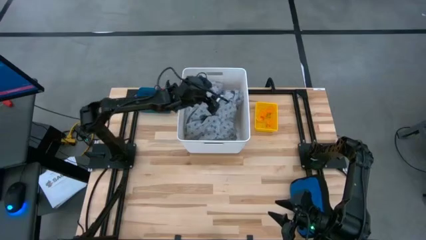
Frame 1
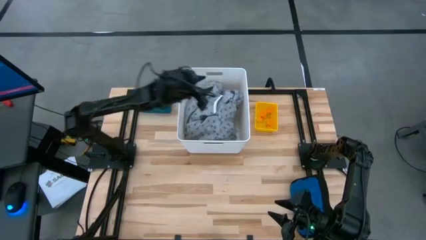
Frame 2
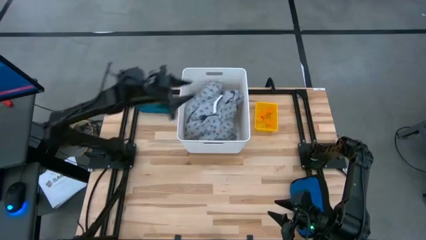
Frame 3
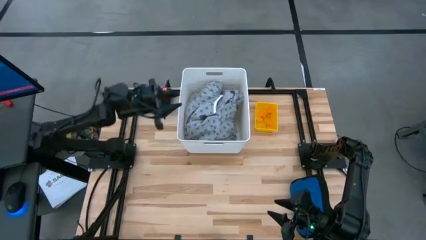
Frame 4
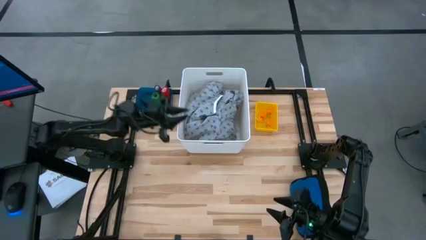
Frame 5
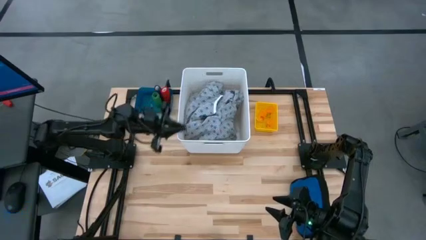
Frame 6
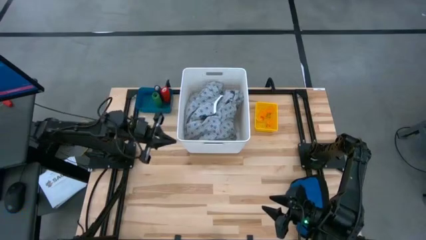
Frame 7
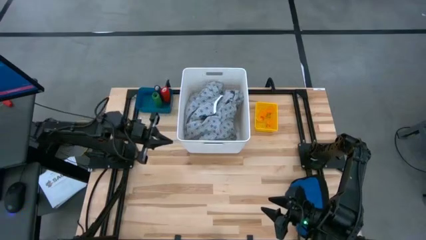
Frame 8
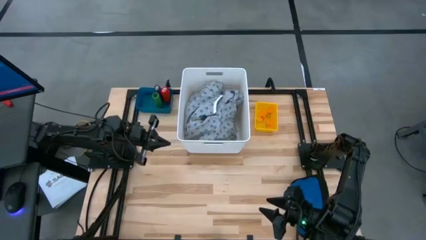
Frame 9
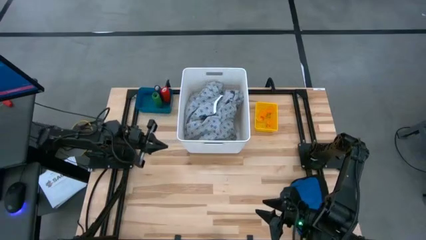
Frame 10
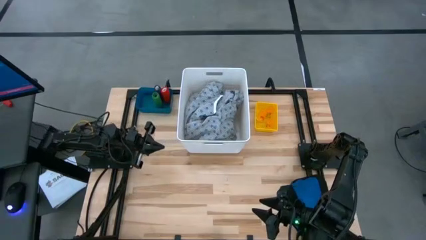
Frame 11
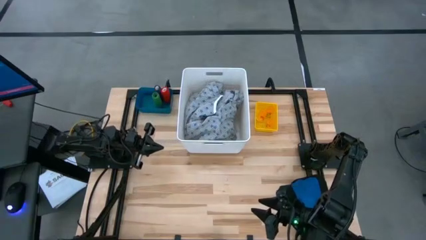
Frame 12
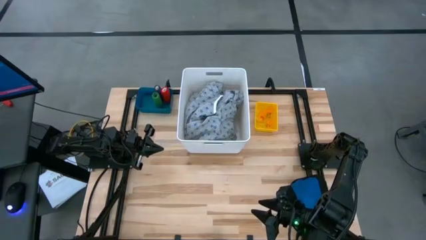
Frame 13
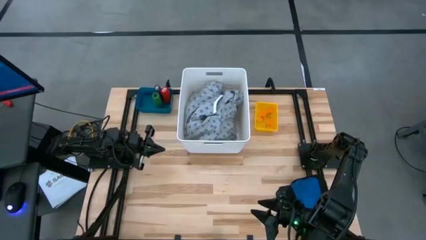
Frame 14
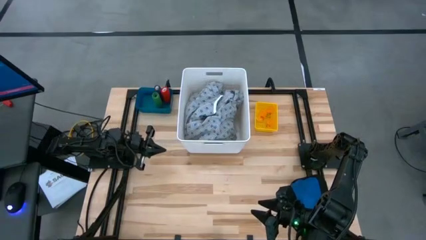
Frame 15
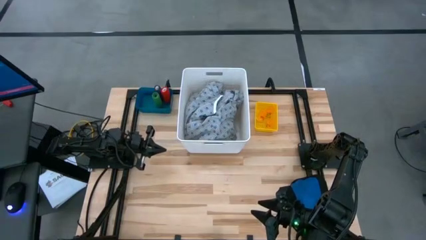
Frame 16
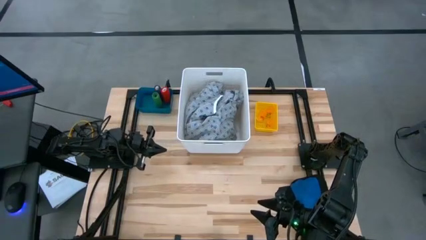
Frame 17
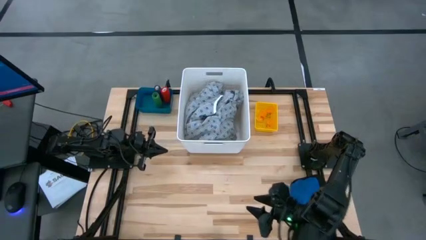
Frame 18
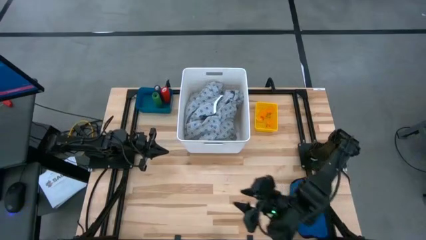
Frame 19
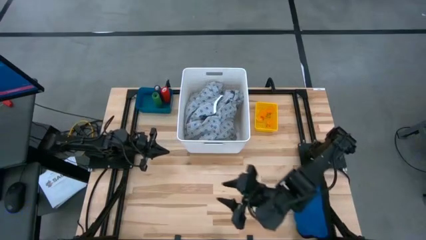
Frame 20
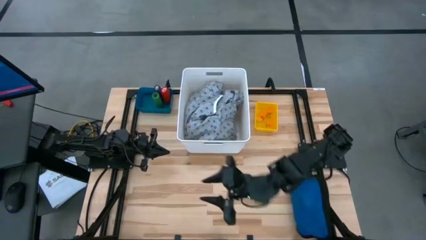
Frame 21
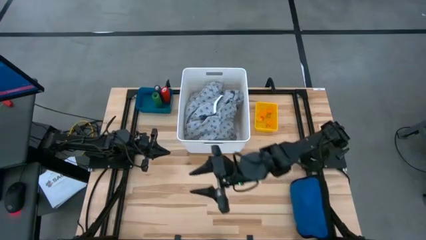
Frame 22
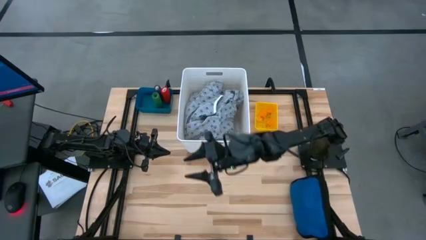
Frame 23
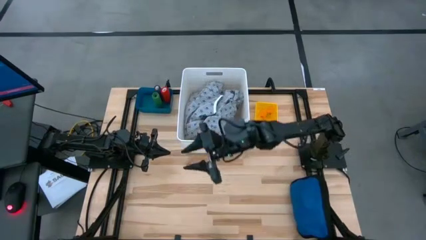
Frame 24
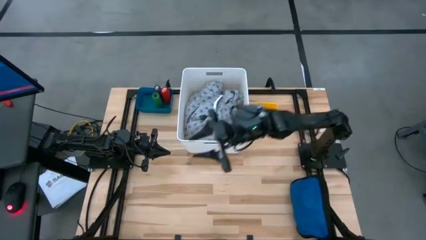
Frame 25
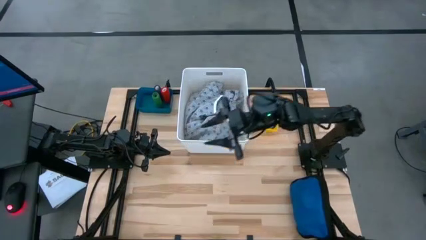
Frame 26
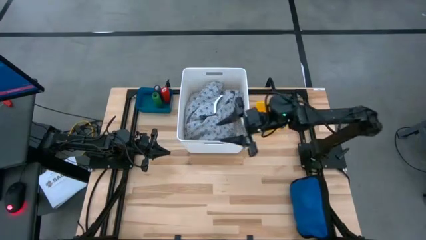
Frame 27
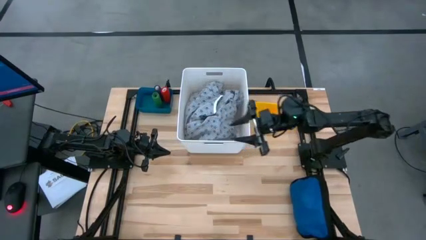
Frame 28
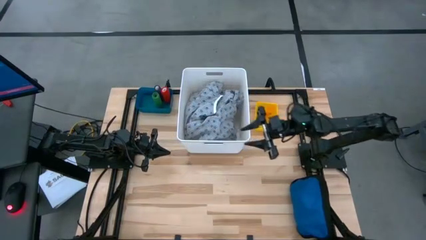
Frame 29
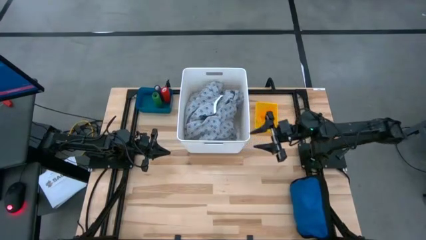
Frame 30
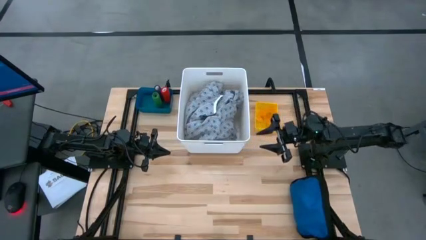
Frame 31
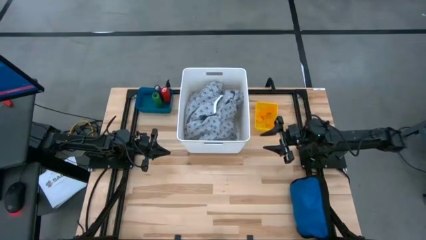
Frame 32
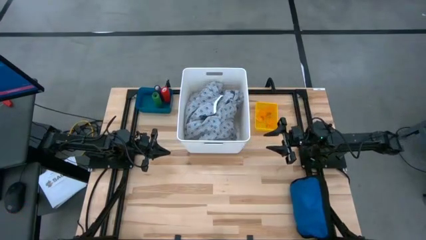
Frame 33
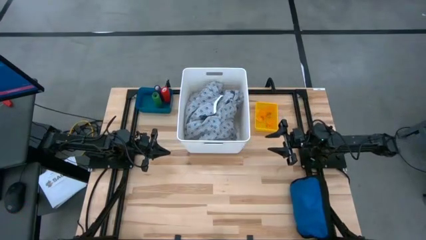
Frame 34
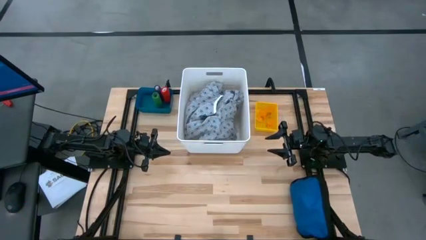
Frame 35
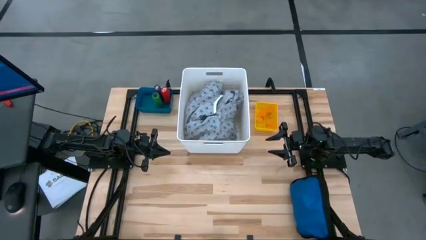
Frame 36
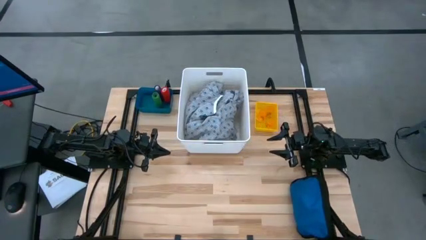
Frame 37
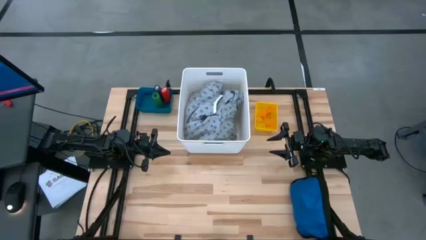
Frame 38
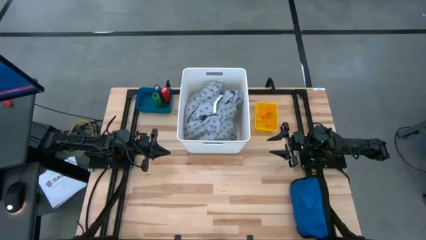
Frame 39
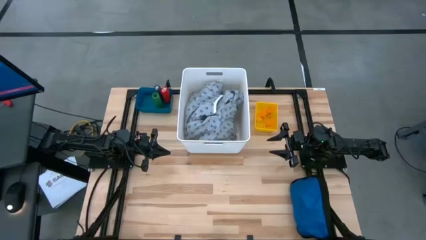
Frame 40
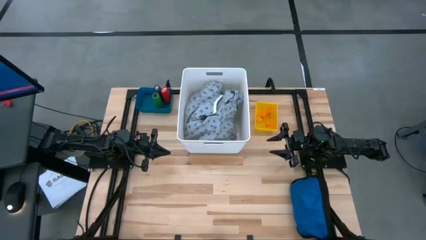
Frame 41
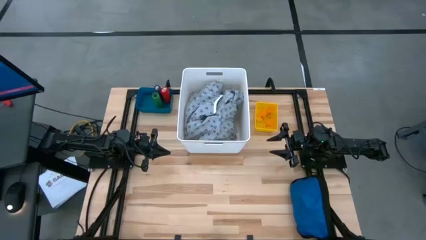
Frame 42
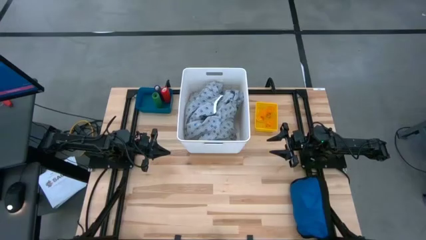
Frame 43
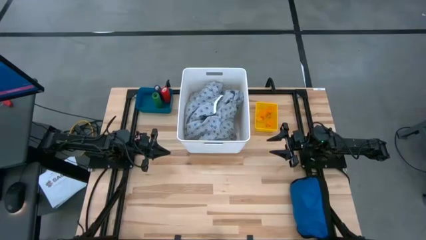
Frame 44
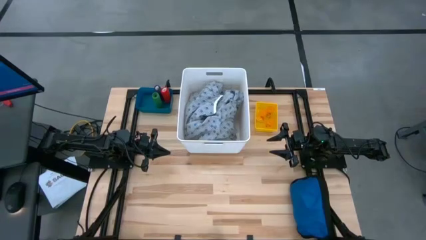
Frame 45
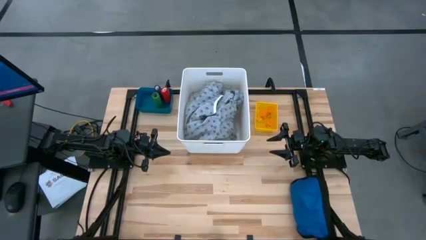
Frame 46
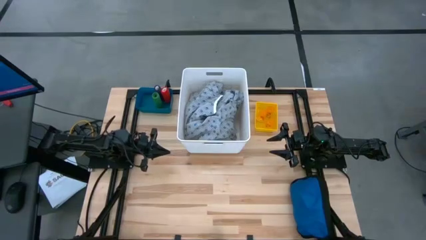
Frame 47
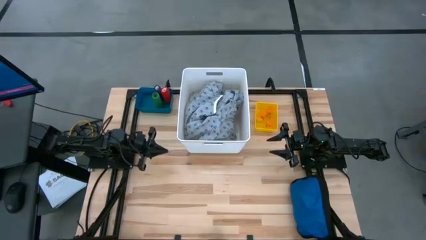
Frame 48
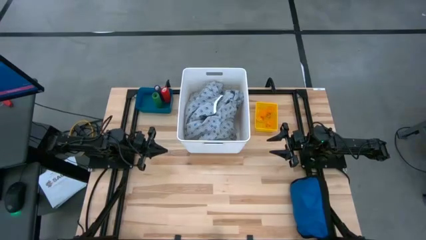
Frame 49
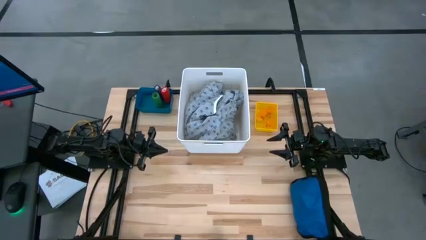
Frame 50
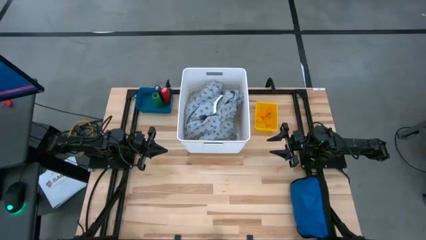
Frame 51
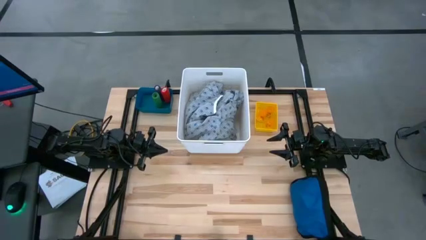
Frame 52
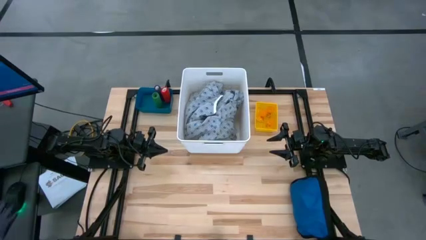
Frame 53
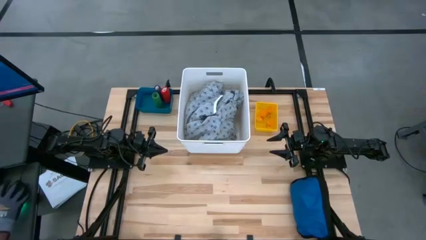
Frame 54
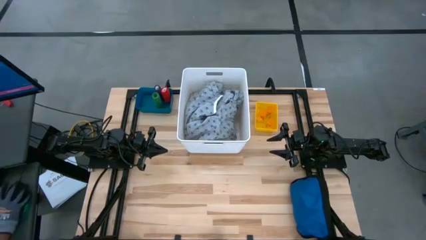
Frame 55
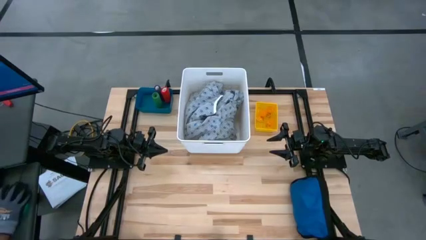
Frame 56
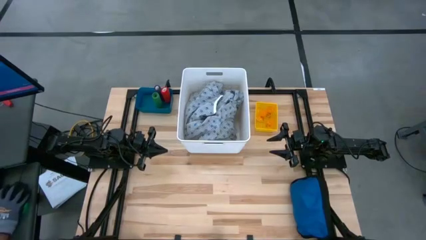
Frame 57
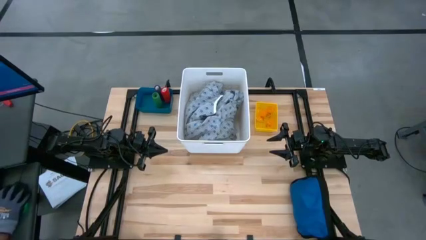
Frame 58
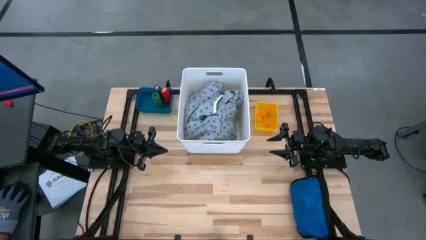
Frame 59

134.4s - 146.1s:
Task: Pick & place medical supplies in basket/bin
Return to Home Position

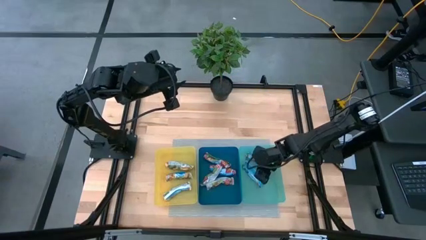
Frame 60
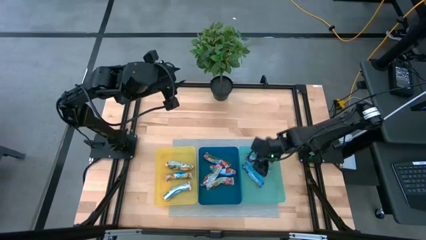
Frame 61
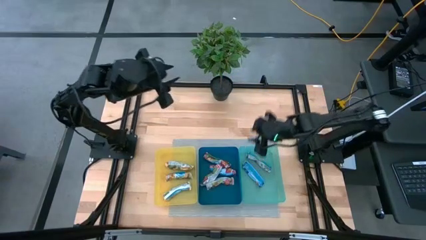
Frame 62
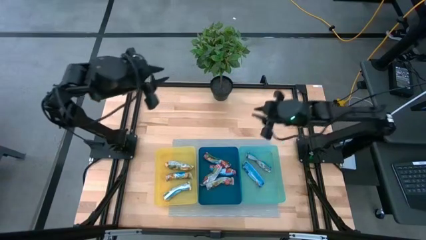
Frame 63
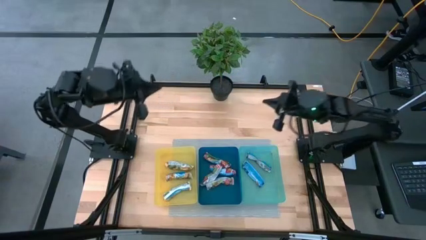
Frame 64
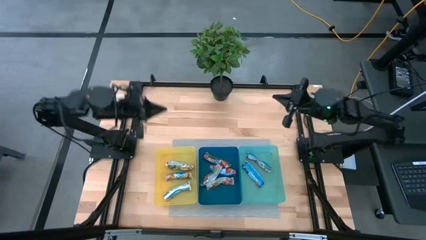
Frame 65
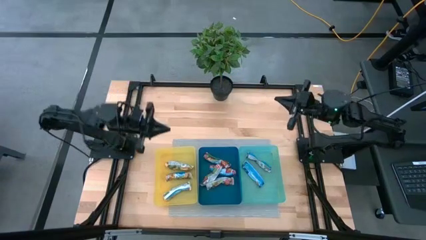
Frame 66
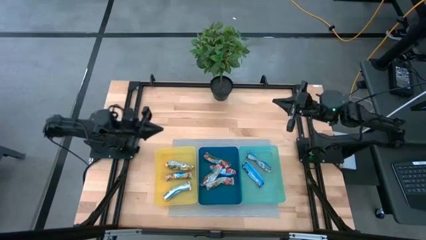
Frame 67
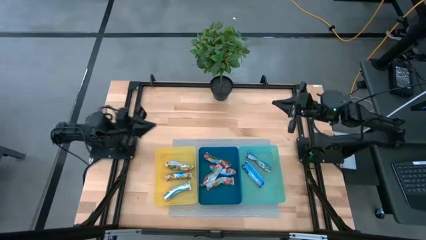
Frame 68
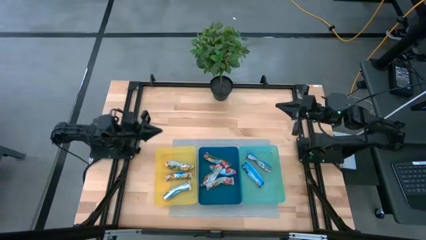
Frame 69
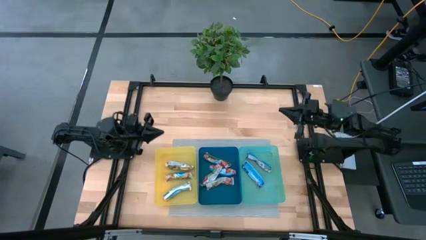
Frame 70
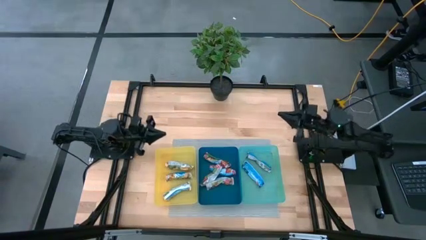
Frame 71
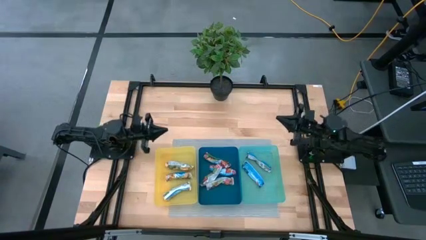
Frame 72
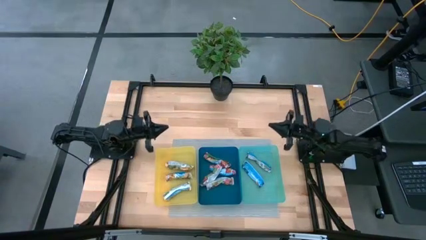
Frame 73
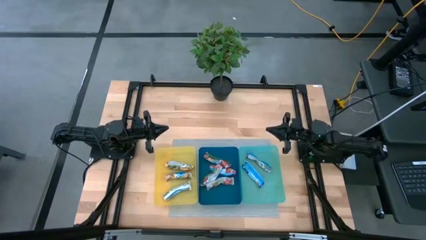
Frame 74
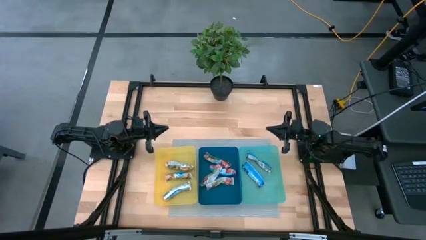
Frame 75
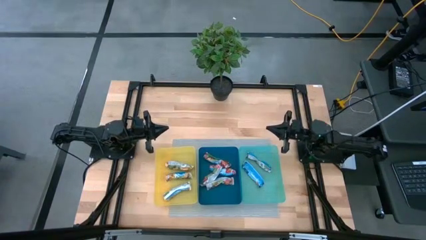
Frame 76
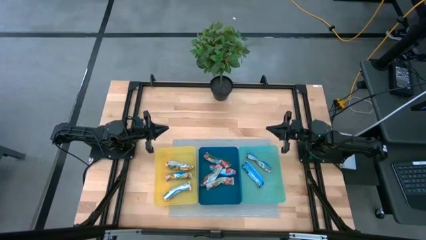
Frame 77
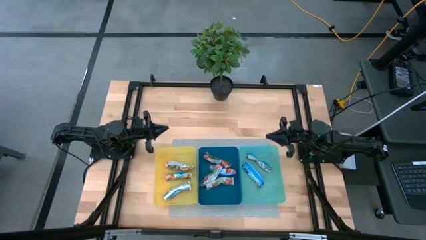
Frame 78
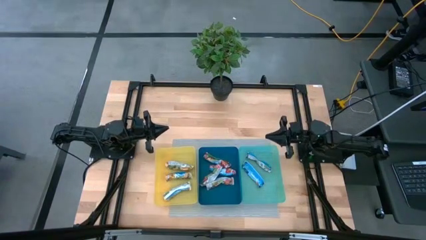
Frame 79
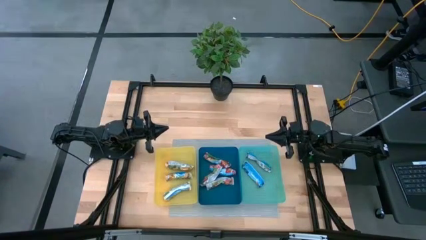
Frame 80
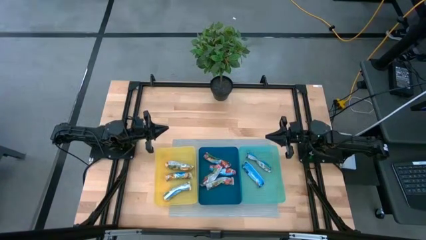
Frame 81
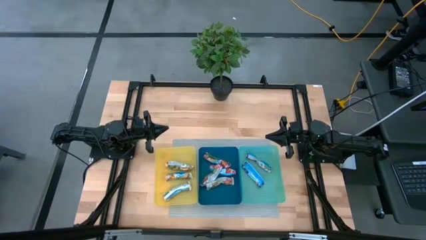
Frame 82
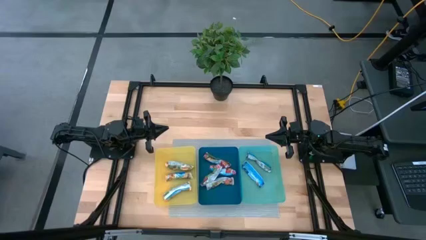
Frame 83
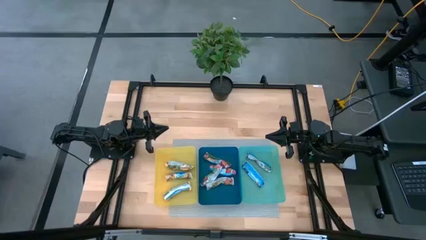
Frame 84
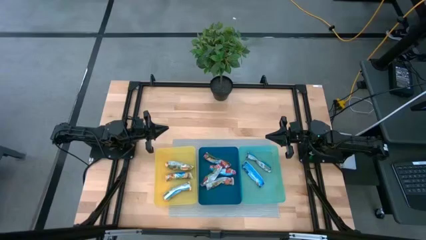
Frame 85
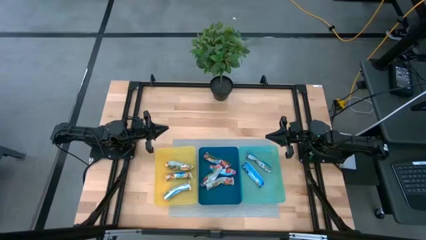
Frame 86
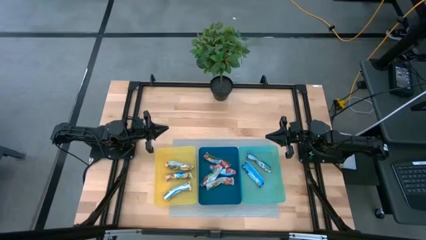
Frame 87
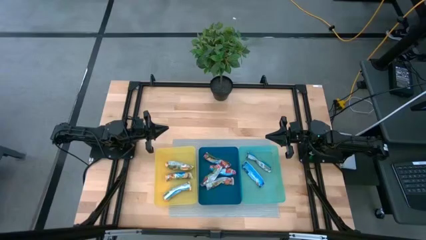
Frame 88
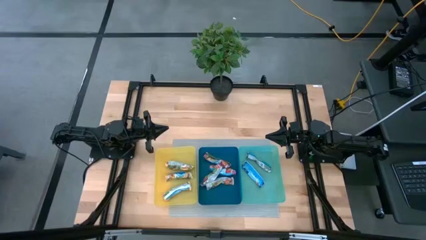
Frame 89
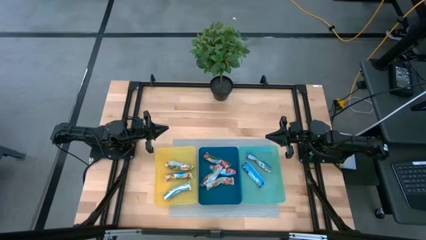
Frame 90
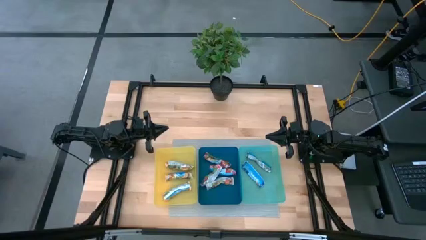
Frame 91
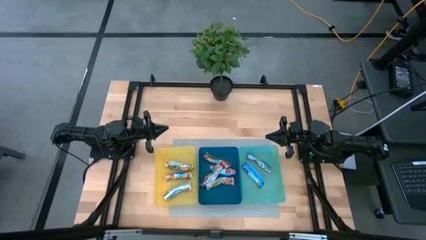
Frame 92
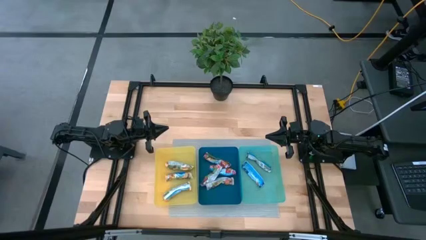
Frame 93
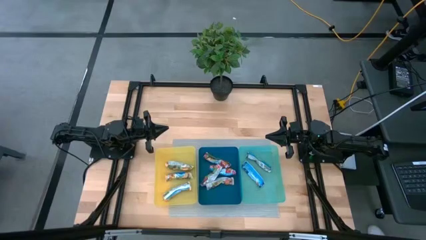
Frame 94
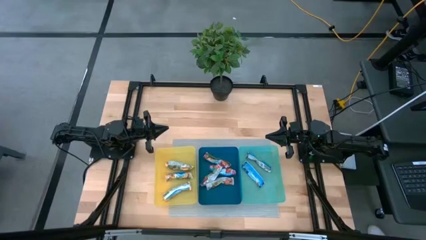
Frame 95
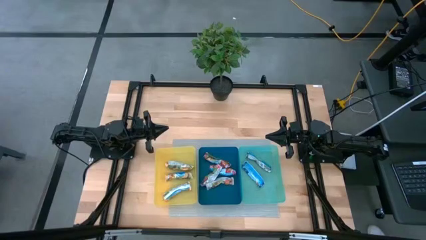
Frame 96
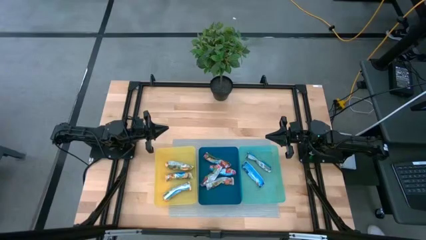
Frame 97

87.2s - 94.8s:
Task: Pick and place Granola Bars by type
Return to Home Position
